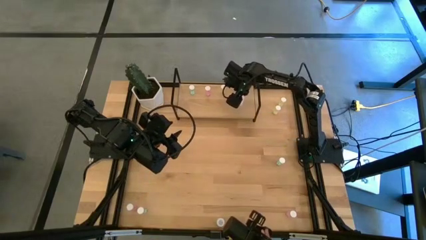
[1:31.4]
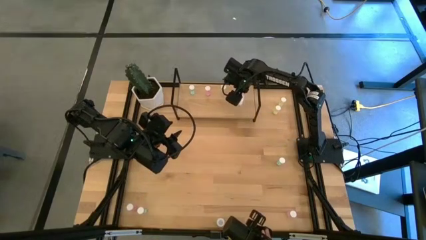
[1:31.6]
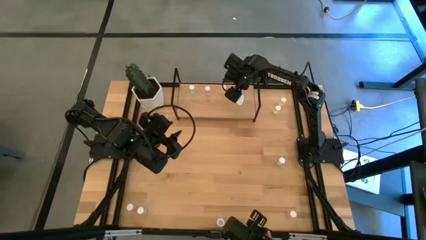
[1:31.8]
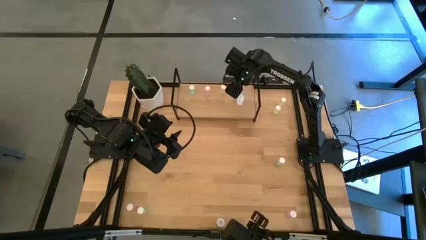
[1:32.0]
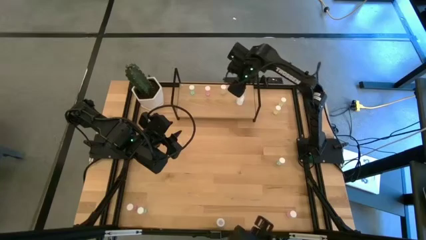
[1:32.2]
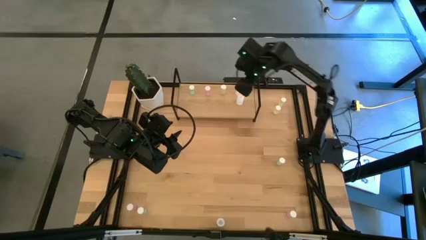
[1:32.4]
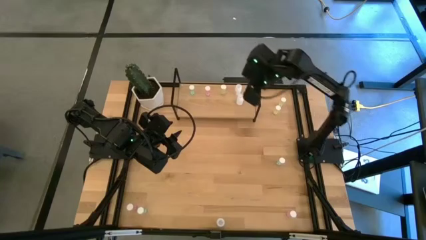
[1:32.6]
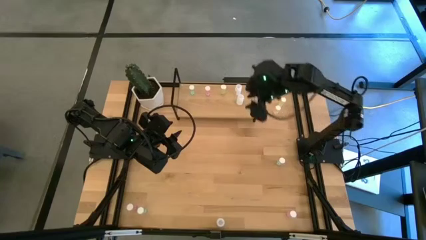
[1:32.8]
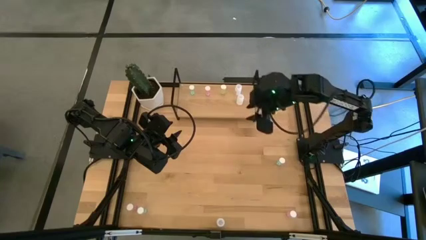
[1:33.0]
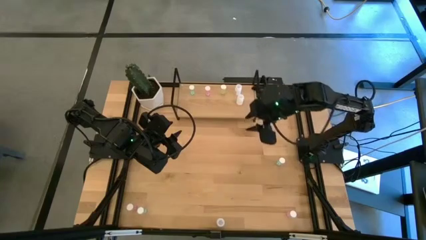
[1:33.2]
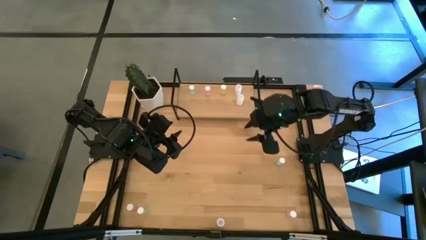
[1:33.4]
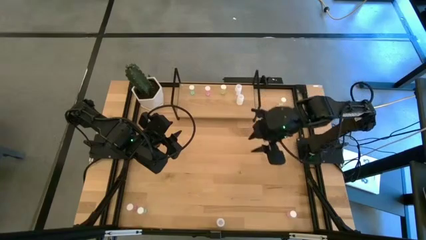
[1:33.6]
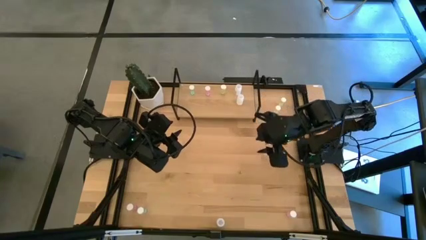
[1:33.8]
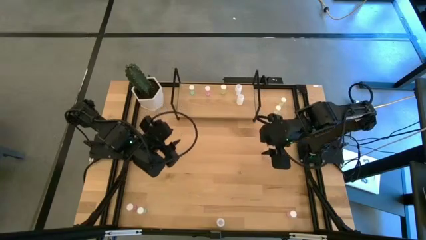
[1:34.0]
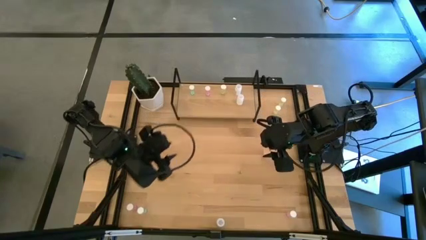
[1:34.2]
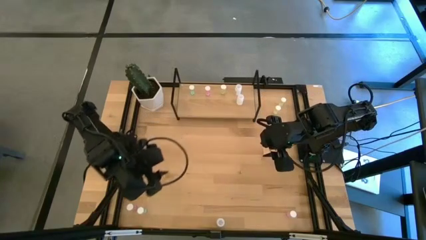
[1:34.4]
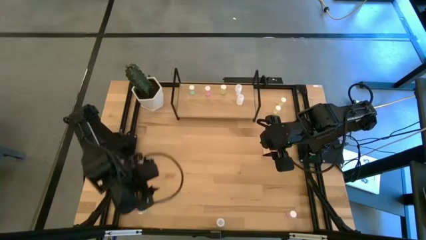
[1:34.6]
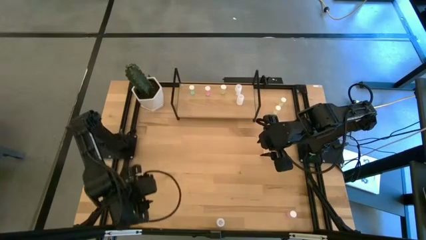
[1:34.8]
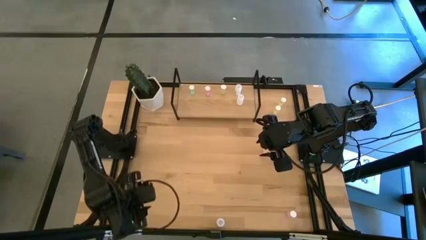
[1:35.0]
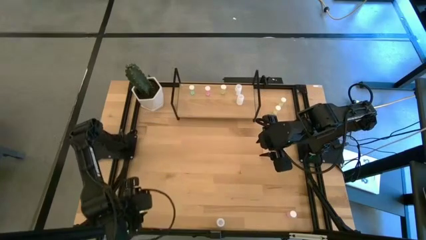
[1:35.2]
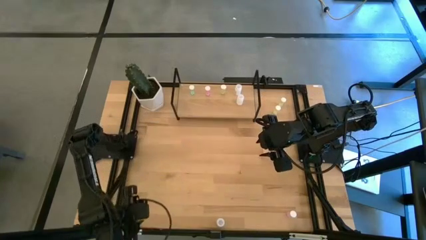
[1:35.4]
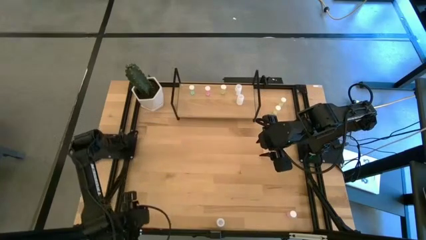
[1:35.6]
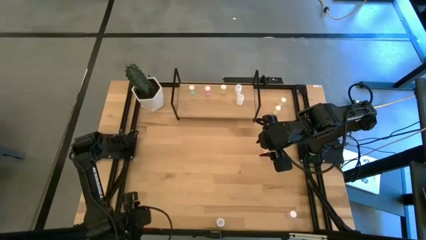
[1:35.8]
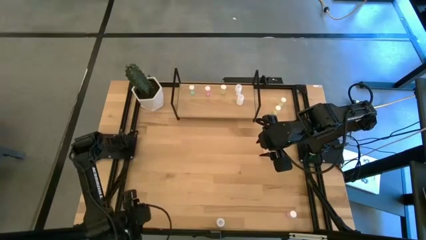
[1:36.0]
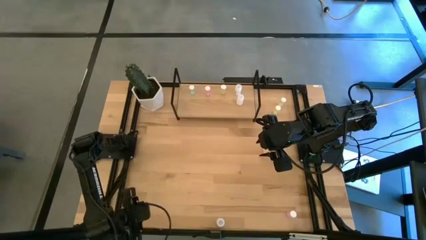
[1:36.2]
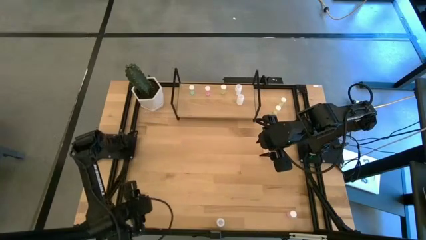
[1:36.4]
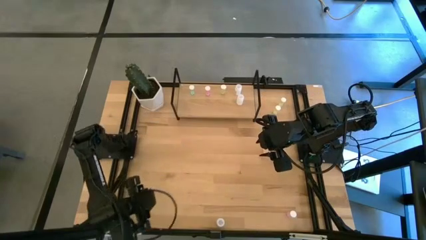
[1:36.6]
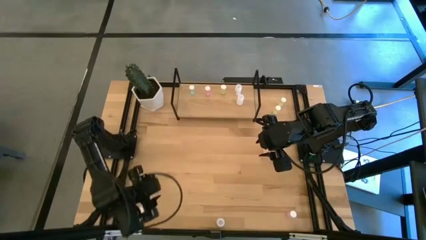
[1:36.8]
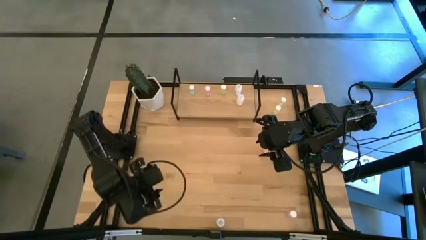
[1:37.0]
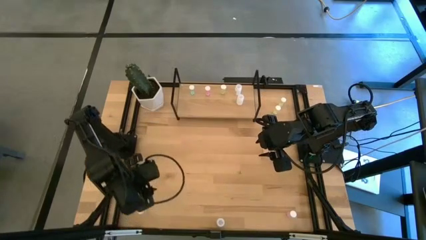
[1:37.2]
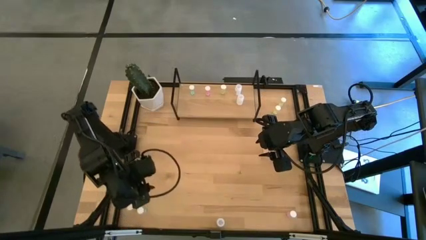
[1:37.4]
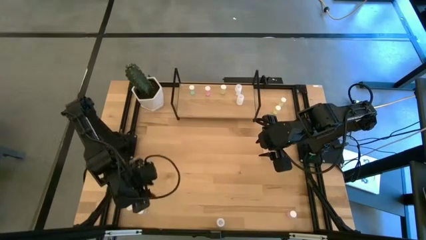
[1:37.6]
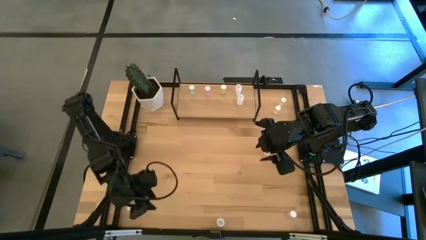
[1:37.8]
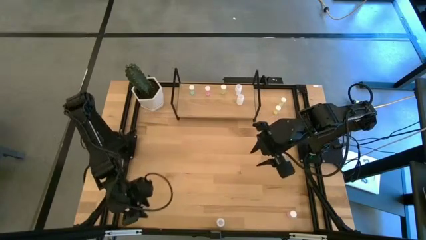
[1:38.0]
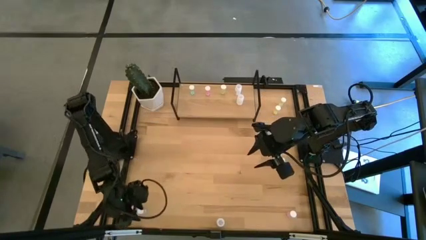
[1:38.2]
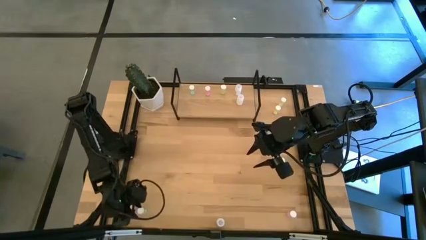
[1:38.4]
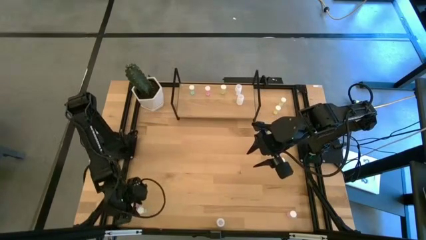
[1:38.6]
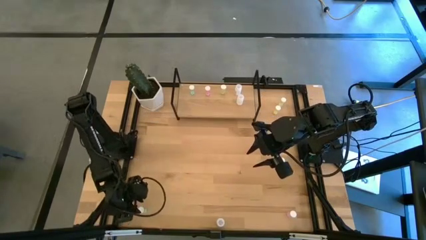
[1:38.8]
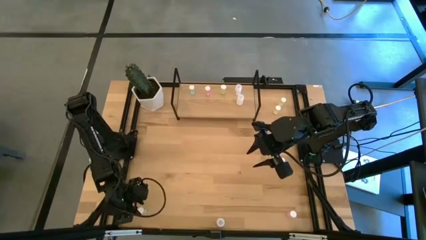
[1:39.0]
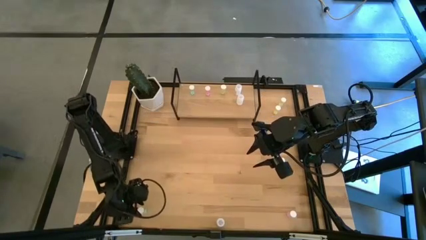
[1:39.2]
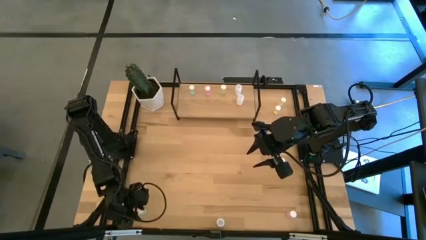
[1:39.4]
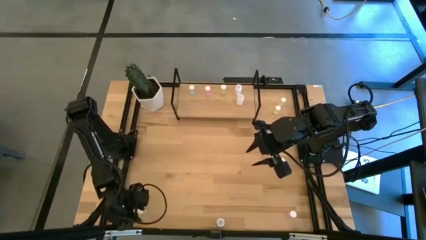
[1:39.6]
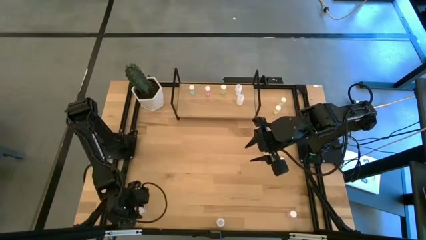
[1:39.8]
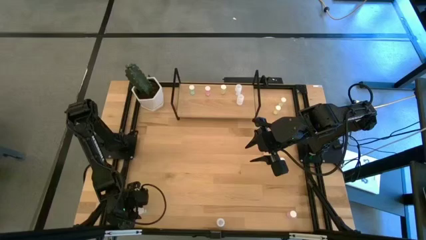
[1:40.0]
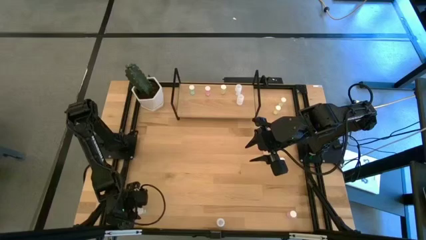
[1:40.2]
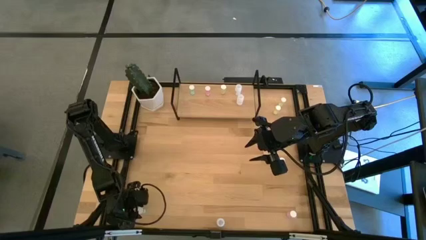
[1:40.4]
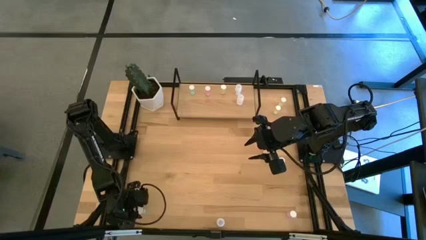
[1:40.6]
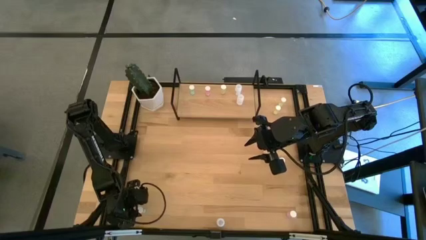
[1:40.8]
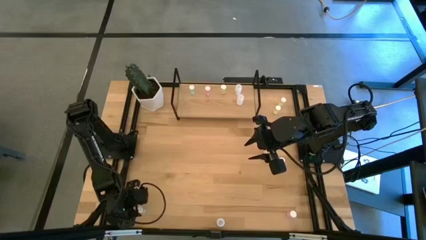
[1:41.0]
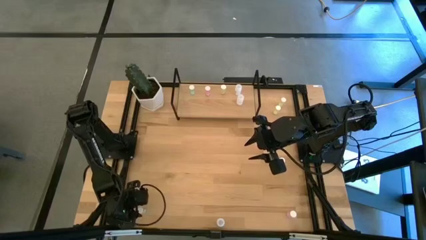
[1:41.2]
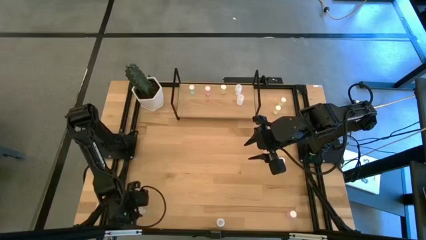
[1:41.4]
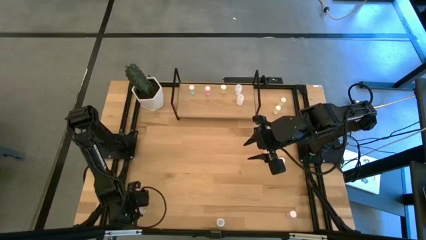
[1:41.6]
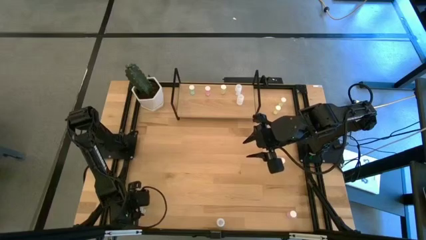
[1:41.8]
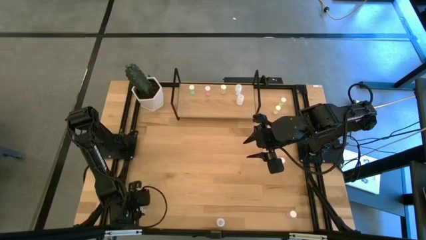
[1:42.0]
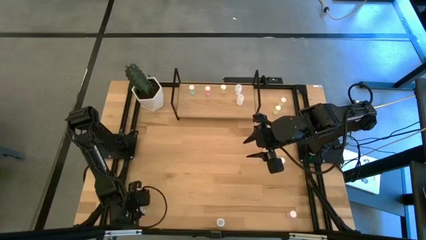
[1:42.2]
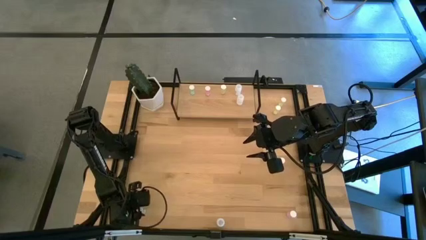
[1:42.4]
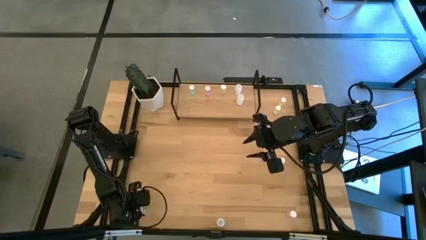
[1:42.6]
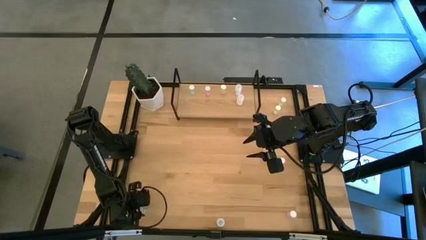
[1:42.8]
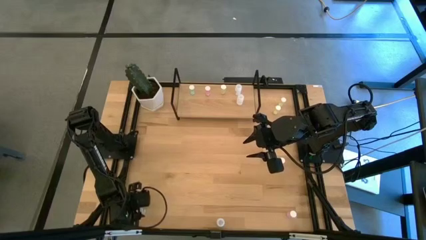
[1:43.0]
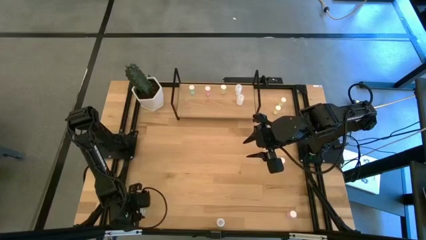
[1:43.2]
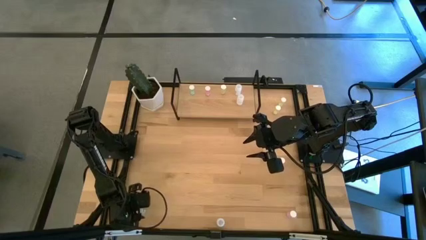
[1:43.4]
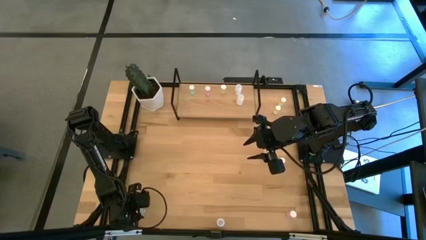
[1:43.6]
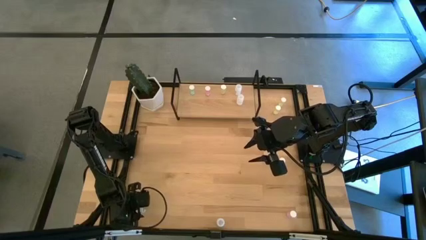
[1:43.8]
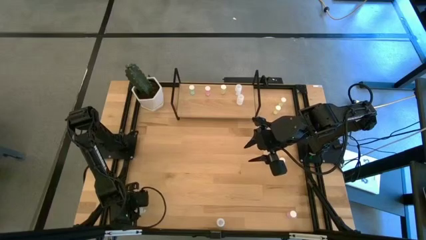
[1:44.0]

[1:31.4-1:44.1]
Task: Pick and place medicine bottles onto shelf by color
Put the bottom blue pill bottle on the shelf aligned with the other blue pill bottle

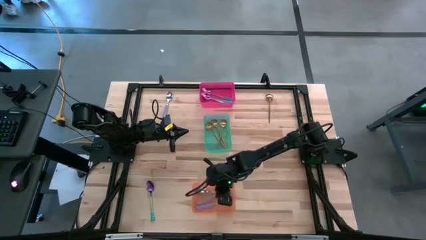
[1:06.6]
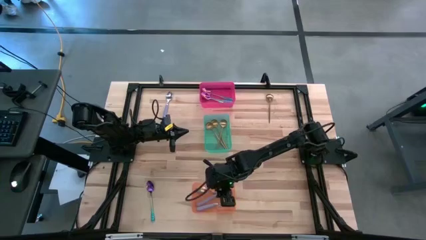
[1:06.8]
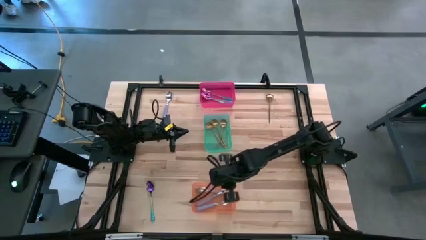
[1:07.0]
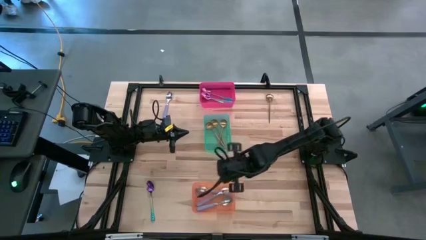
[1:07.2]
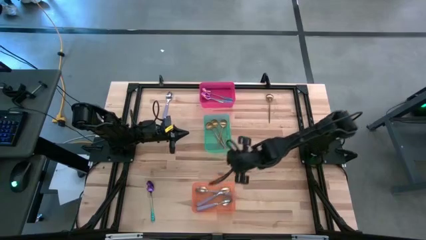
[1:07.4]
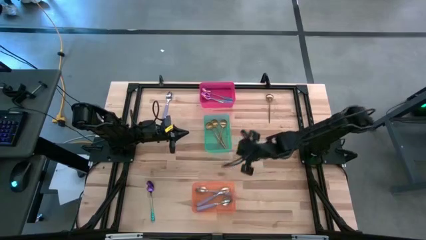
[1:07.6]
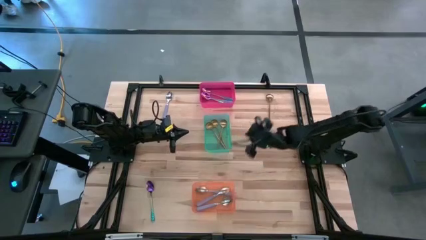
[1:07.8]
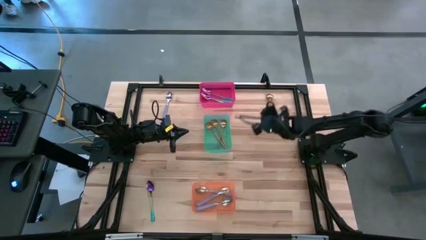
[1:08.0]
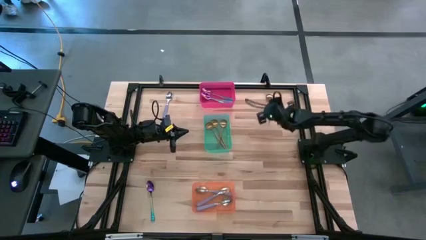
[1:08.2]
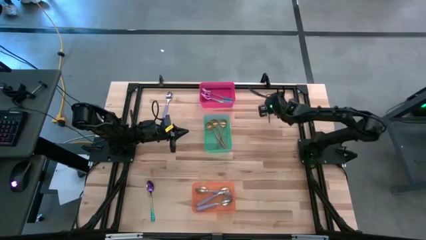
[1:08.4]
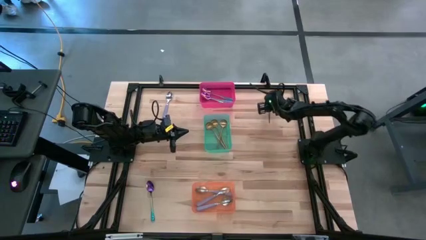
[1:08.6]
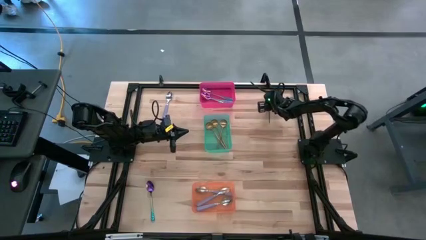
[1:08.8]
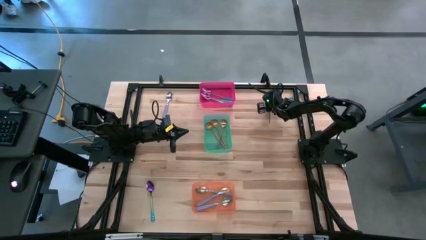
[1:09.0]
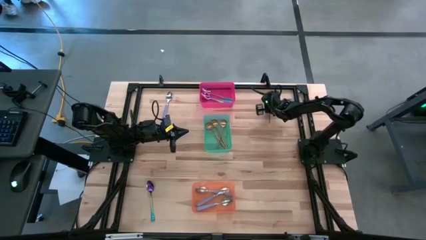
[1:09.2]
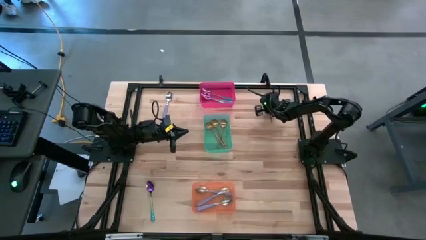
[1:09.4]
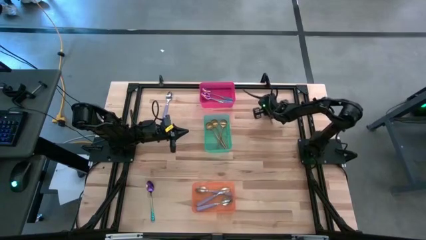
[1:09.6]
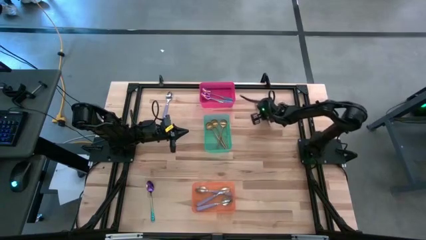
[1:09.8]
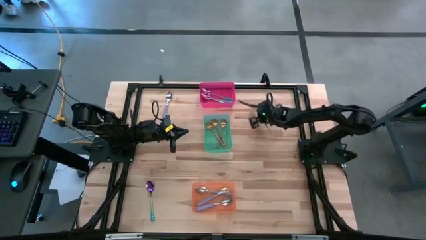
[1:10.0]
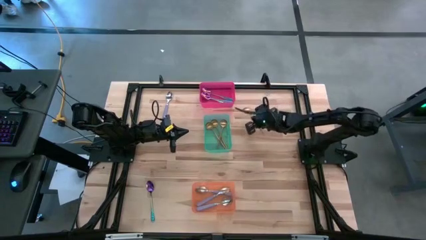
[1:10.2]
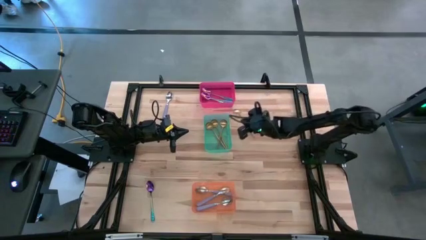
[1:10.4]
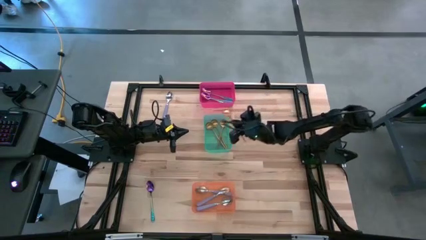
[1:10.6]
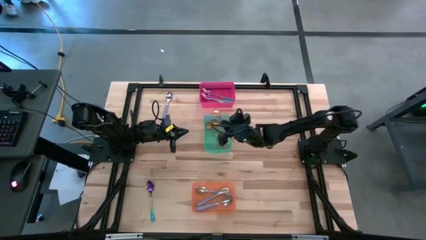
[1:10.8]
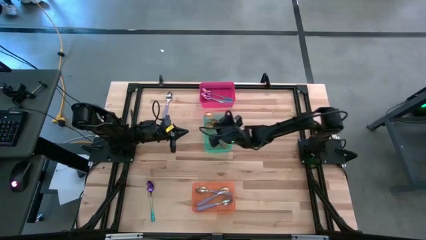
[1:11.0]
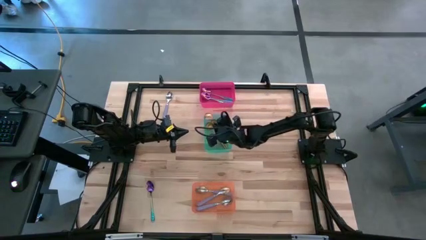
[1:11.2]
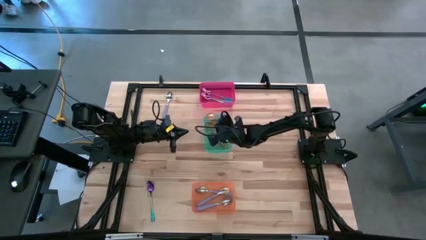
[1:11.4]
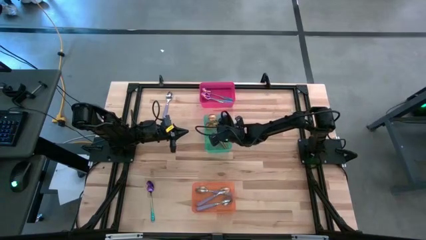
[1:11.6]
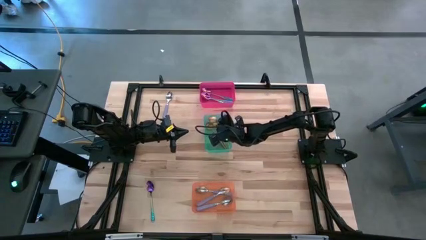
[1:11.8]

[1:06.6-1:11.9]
Task: Sort silverware by color (type)
Put the gold spoon into the blue bin
